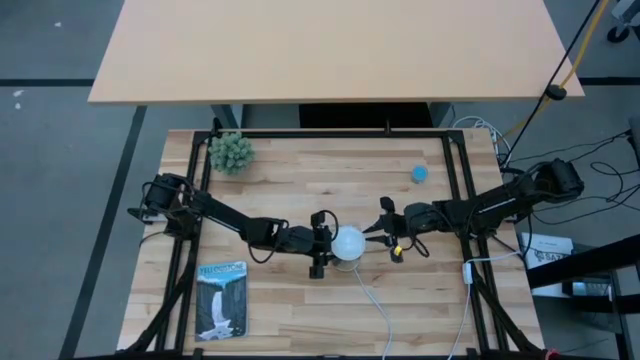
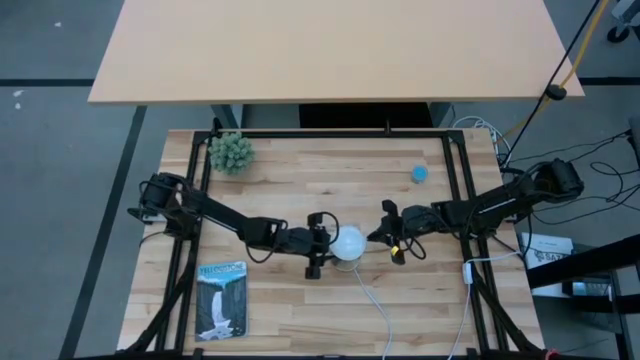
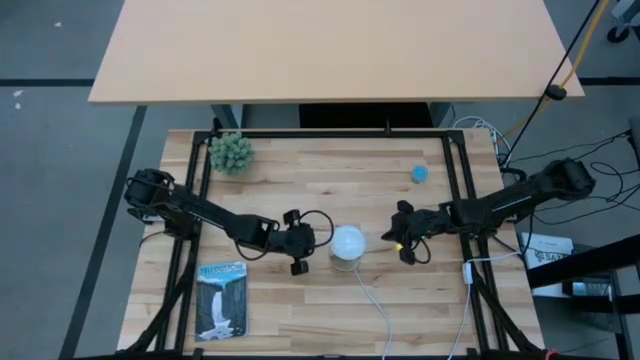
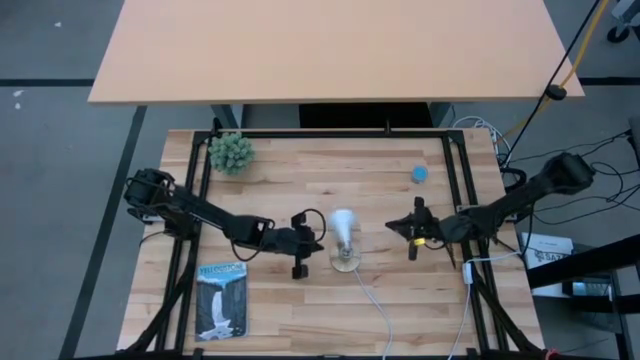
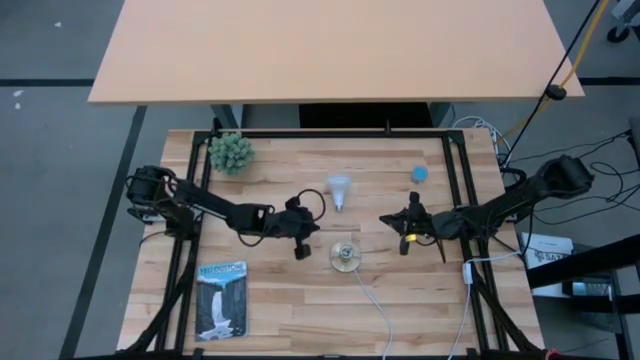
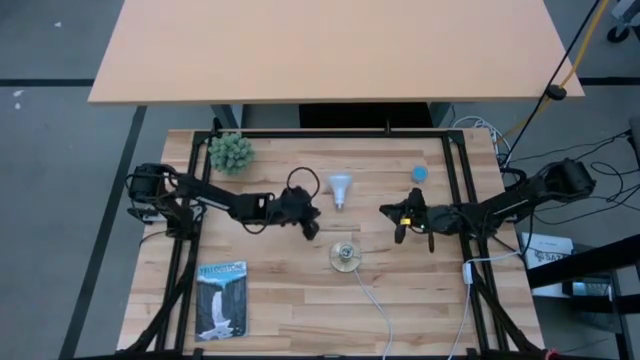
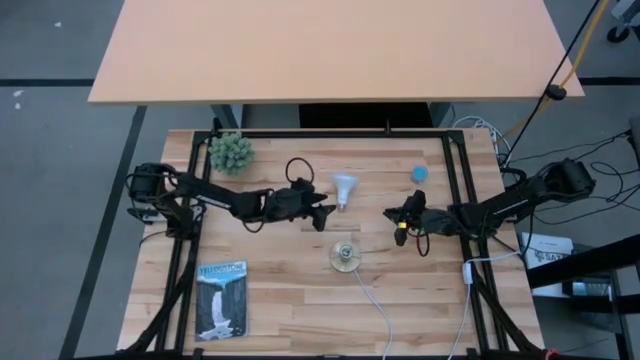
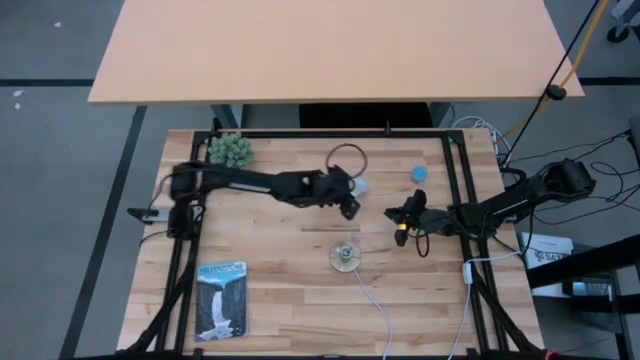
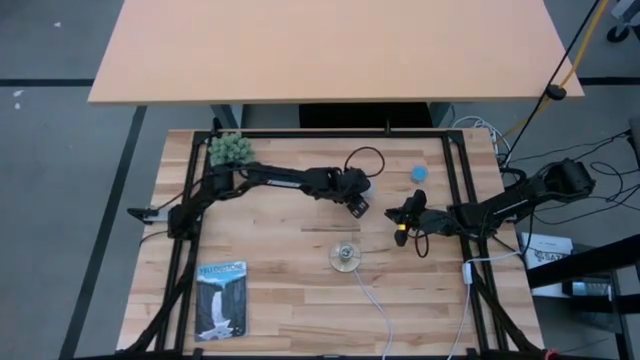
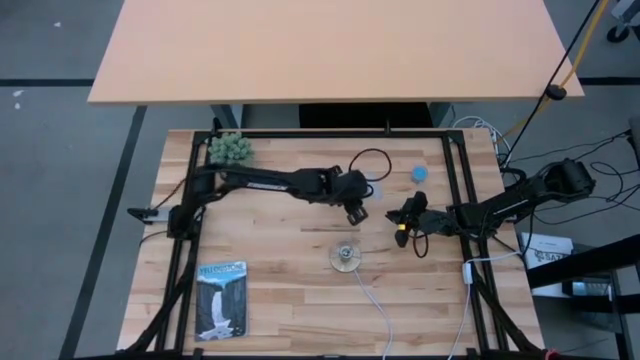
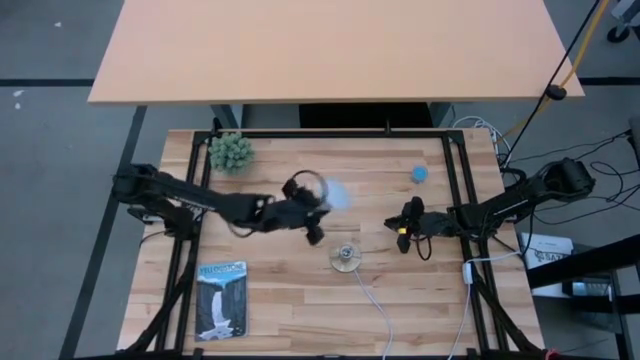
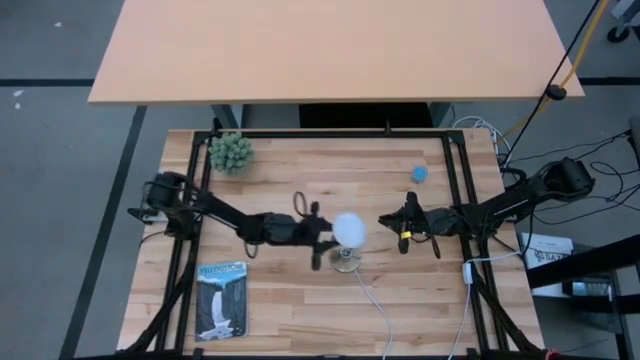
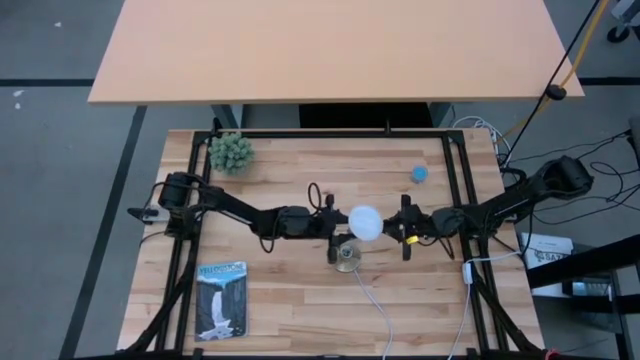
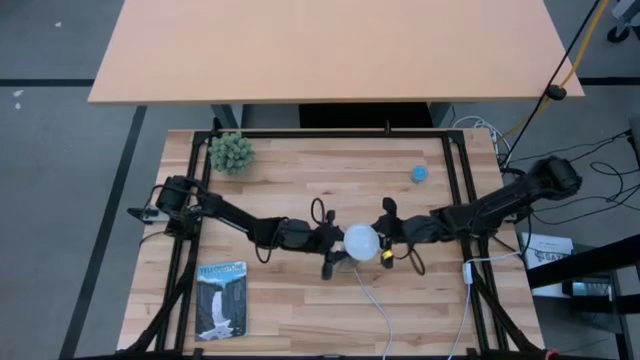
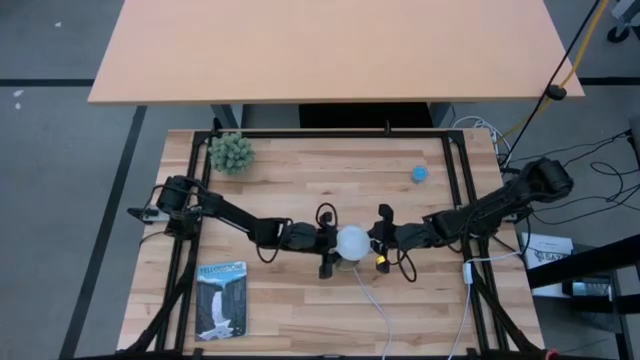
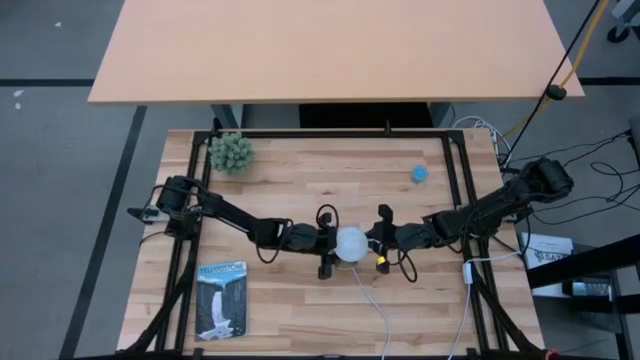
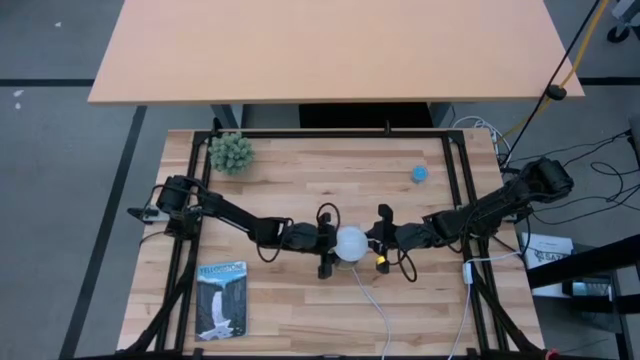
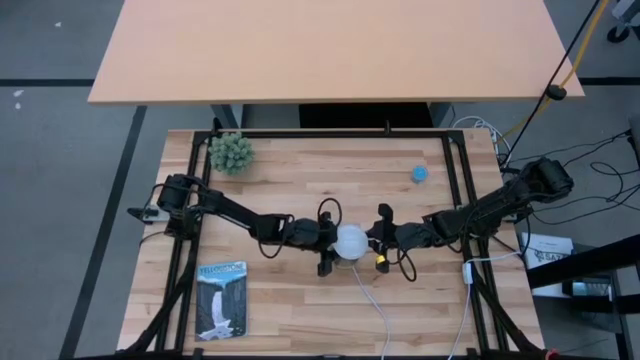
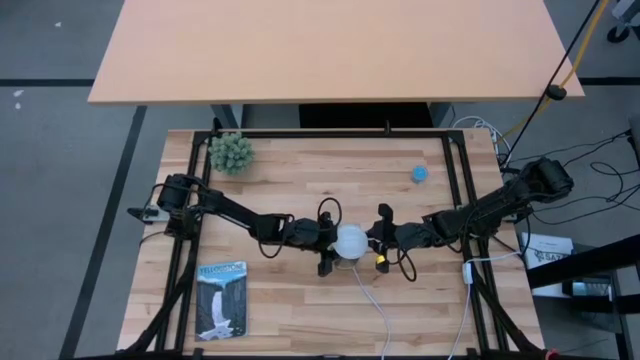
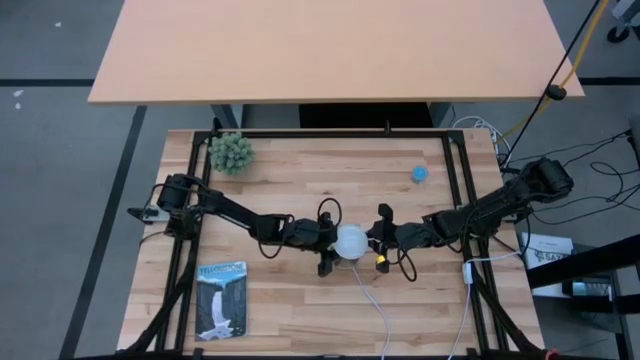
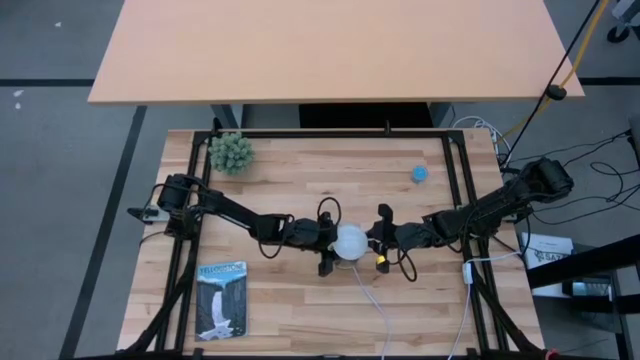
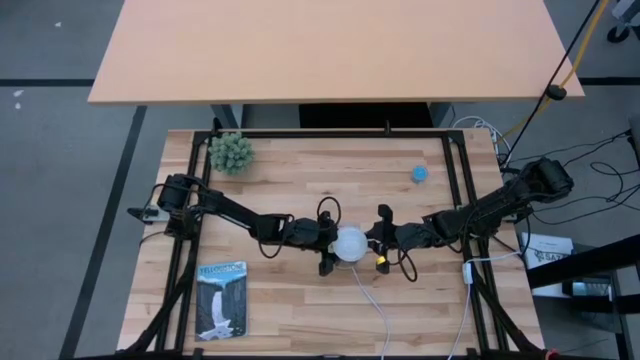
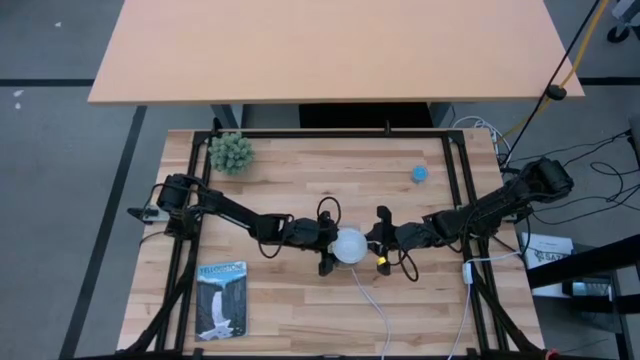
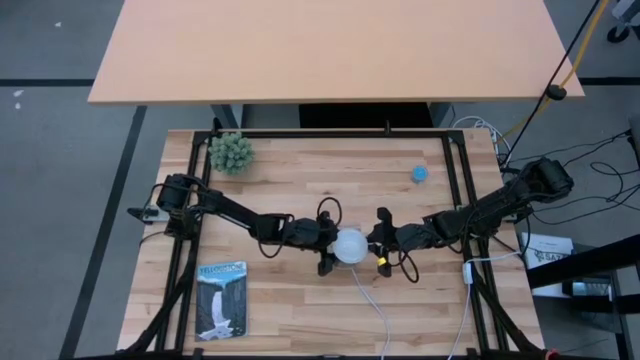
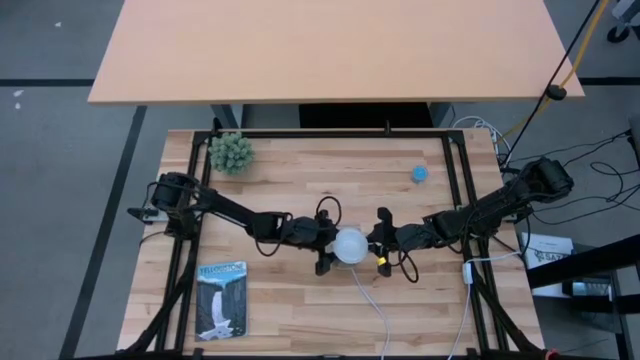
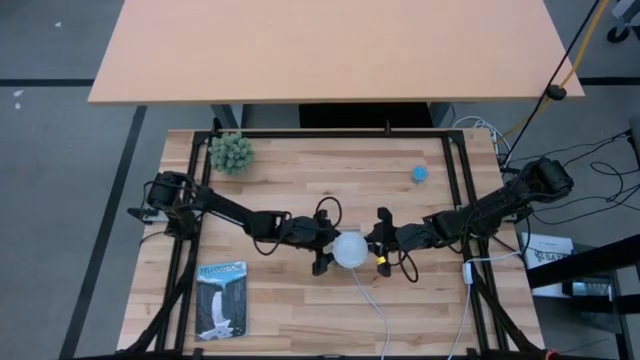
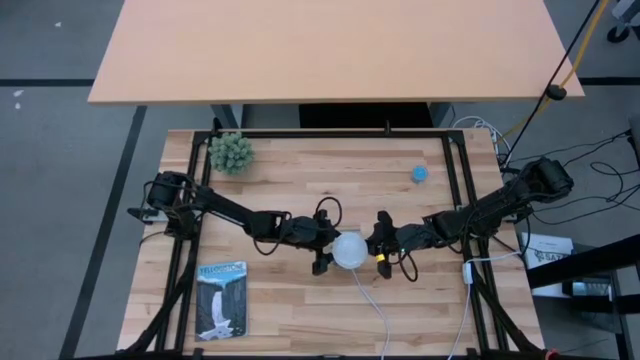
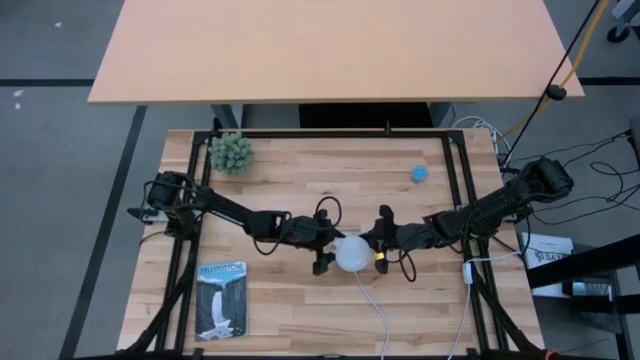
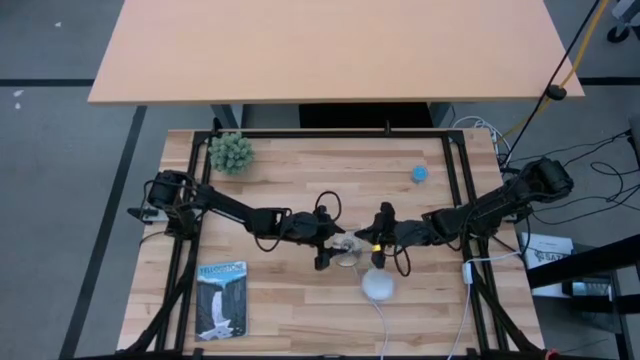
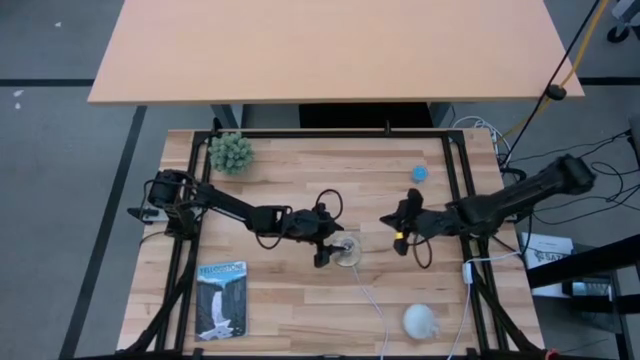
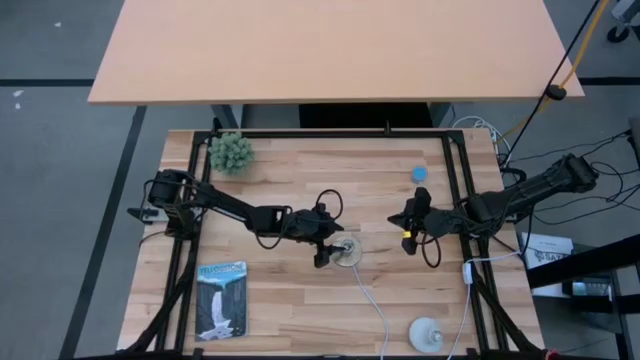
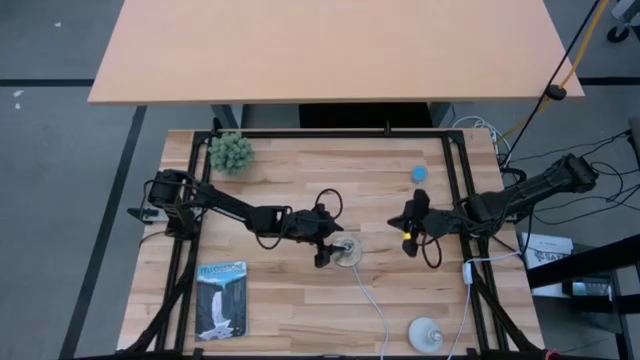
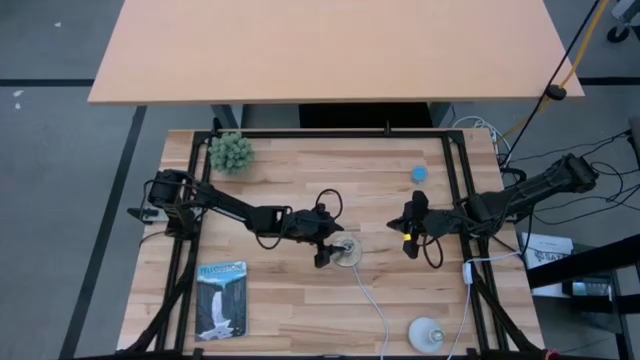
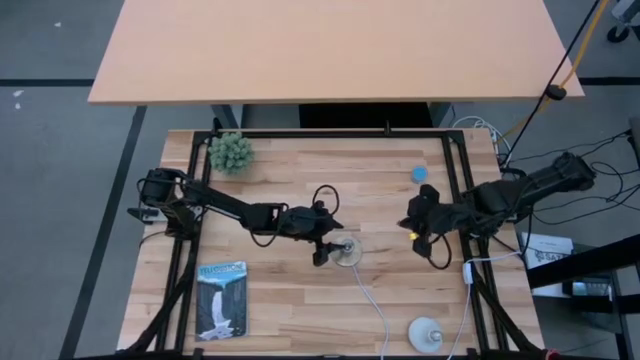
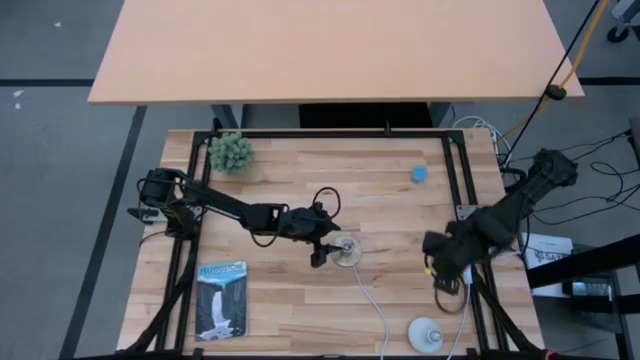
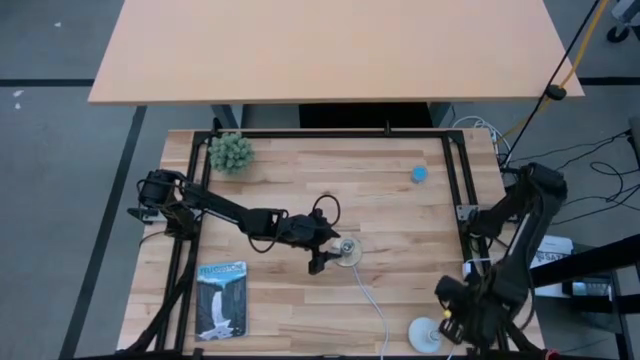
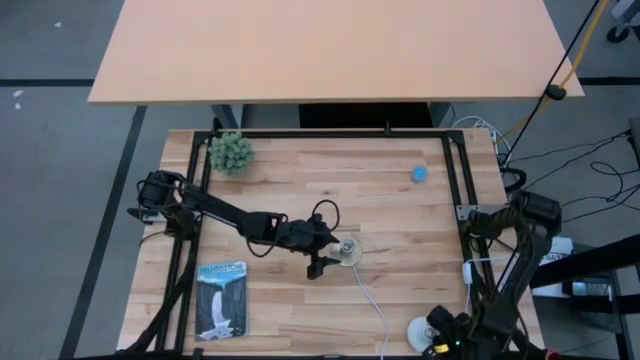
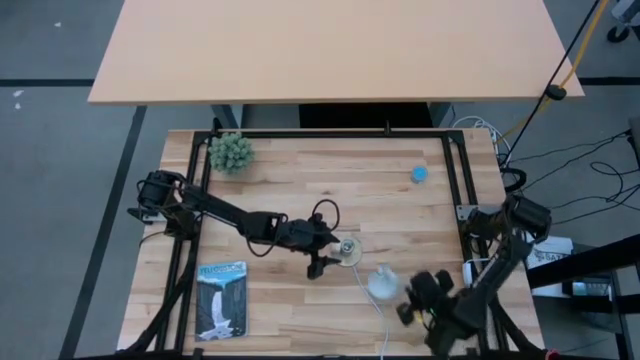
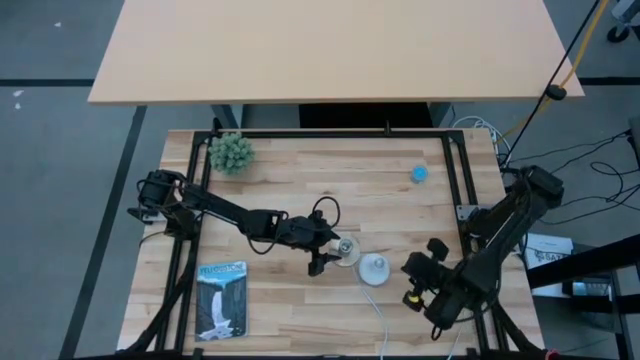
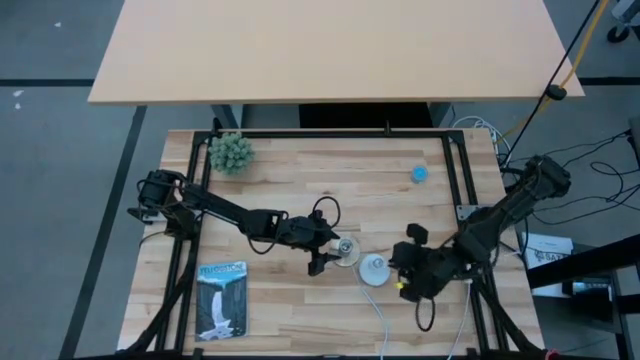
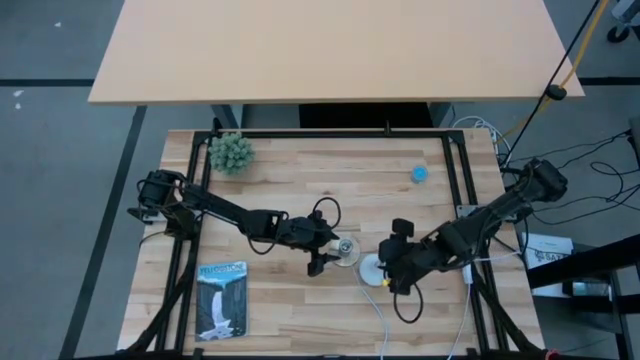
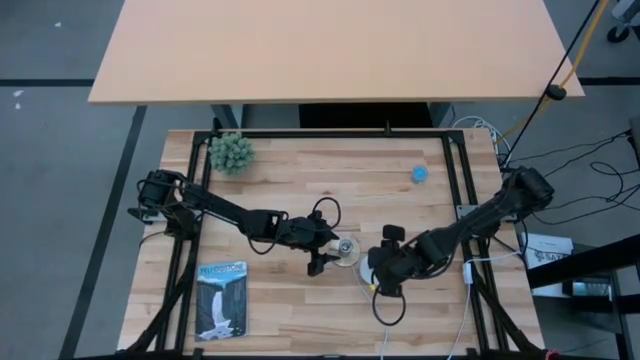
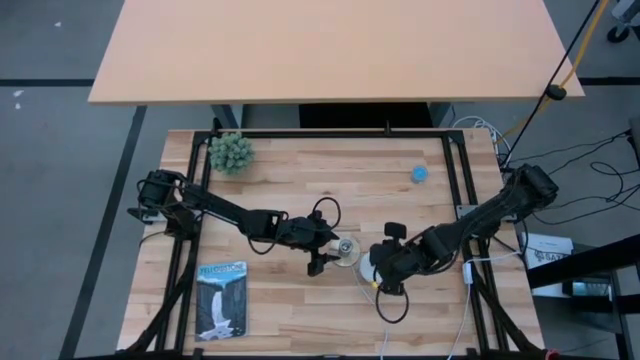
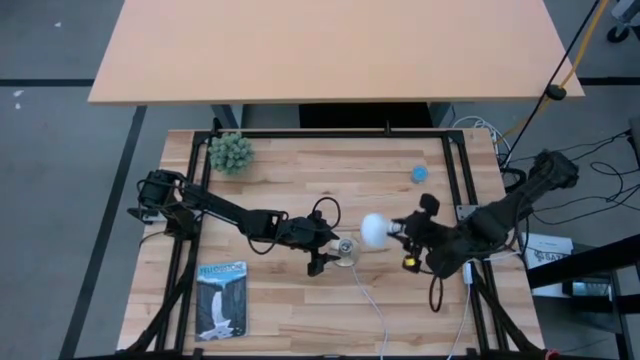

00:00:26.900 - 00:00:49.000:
Task: Screw lightbulb
Insert the lightbulb into the desk lamp
